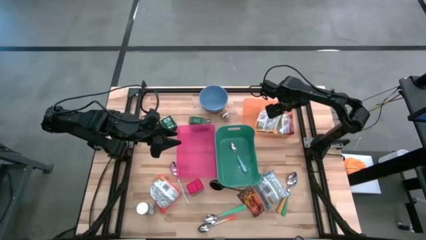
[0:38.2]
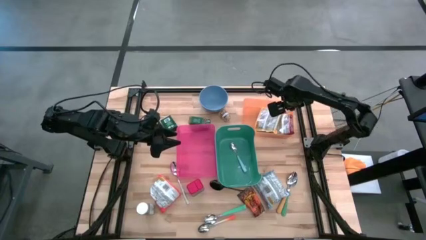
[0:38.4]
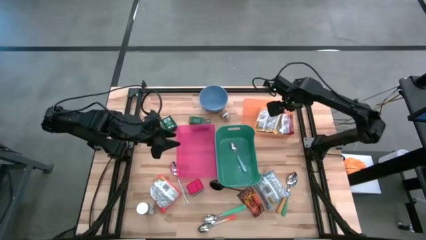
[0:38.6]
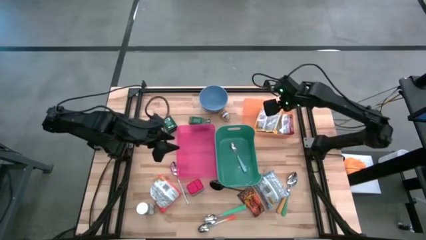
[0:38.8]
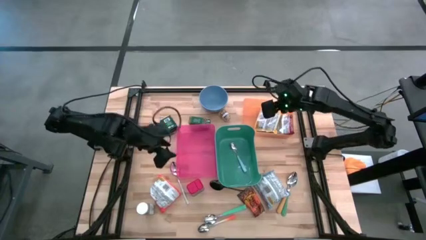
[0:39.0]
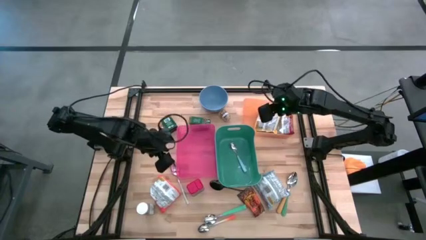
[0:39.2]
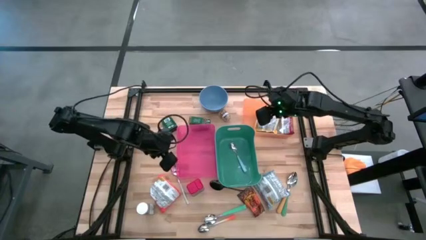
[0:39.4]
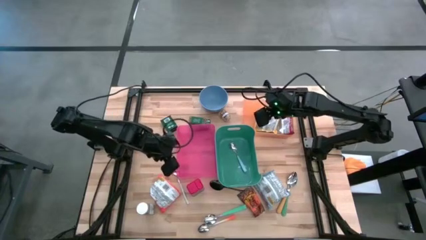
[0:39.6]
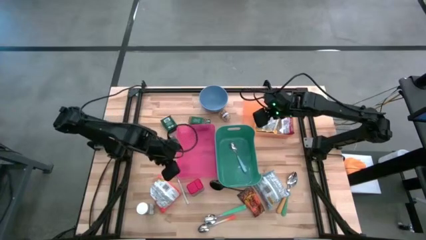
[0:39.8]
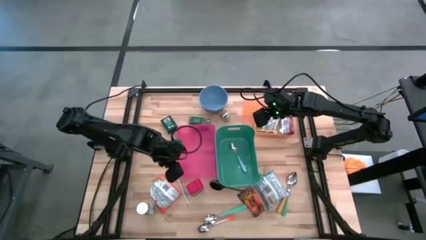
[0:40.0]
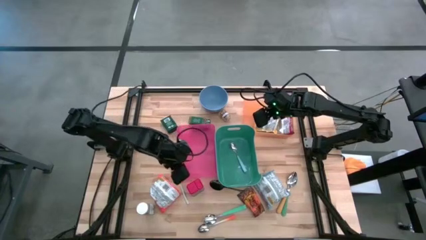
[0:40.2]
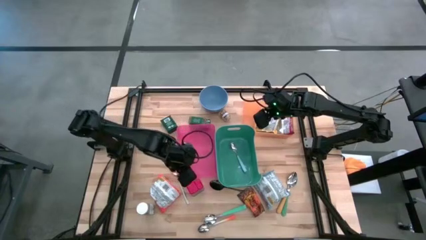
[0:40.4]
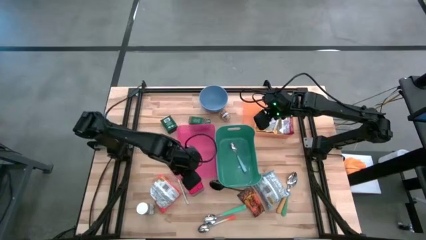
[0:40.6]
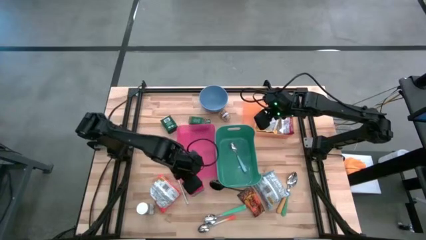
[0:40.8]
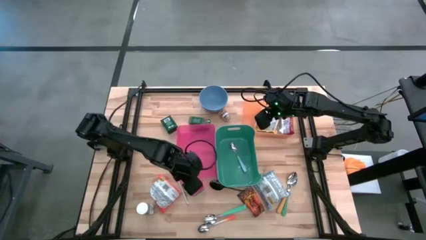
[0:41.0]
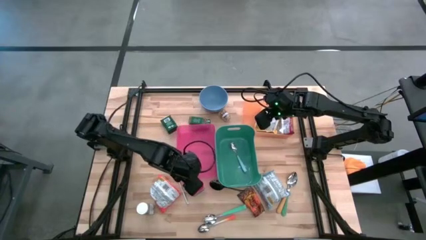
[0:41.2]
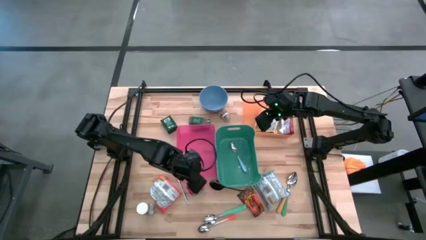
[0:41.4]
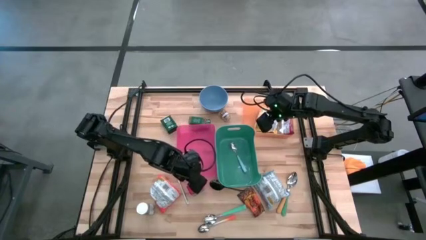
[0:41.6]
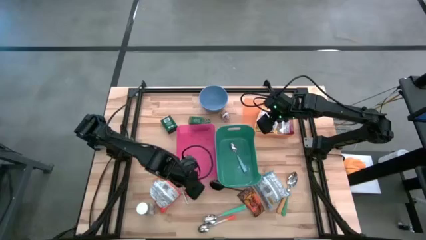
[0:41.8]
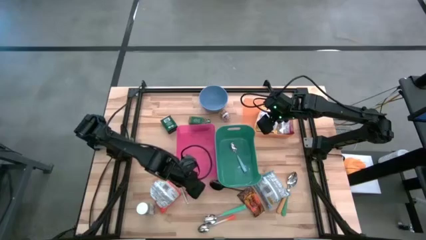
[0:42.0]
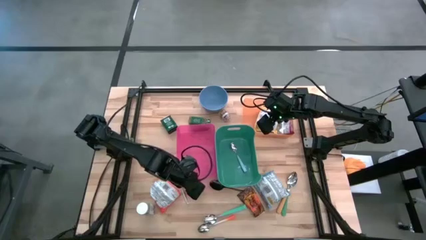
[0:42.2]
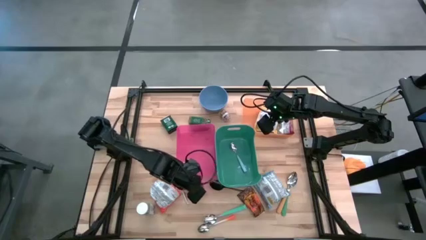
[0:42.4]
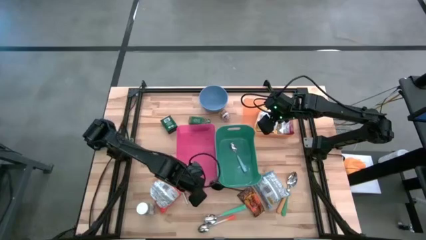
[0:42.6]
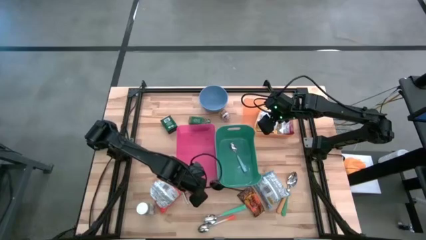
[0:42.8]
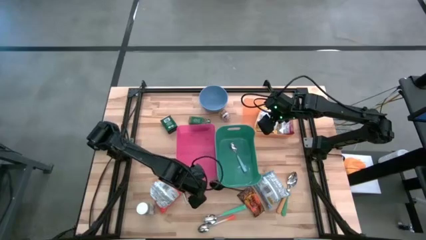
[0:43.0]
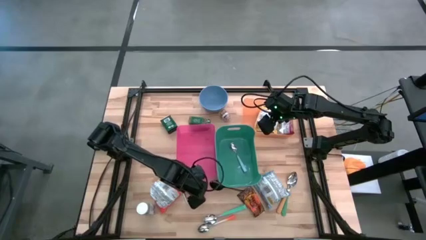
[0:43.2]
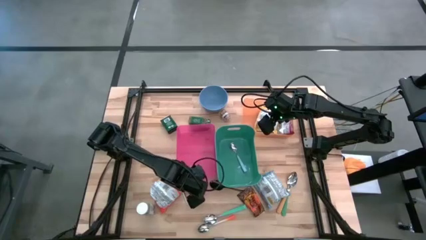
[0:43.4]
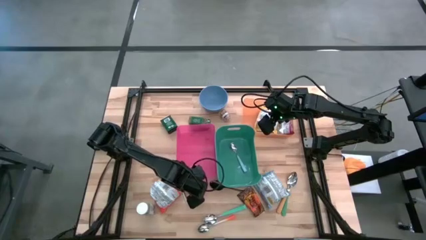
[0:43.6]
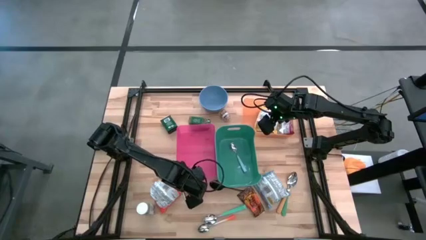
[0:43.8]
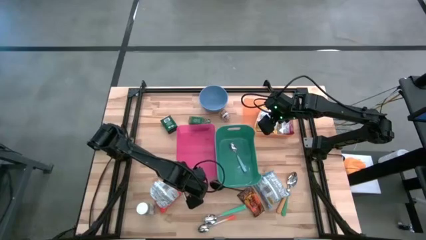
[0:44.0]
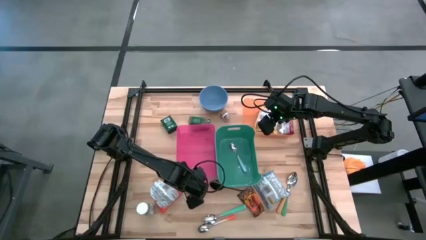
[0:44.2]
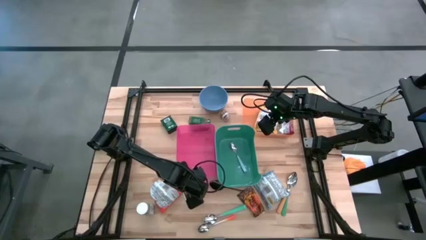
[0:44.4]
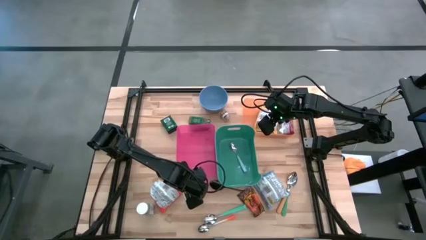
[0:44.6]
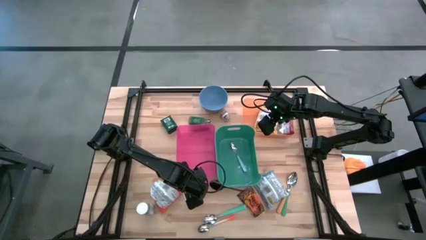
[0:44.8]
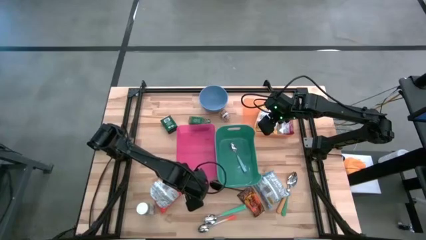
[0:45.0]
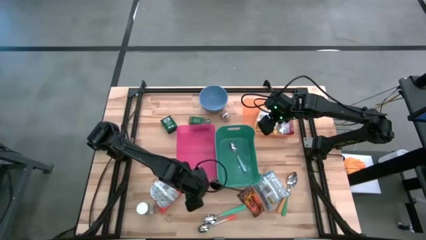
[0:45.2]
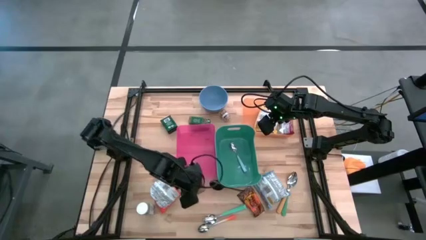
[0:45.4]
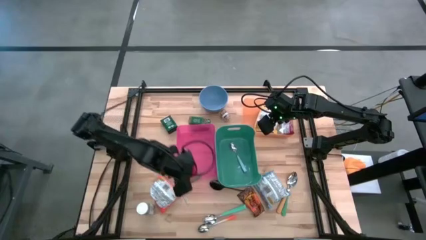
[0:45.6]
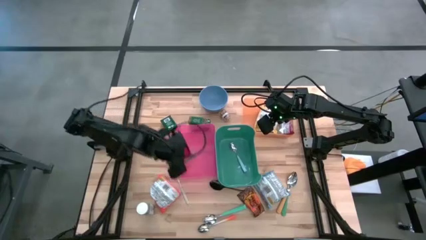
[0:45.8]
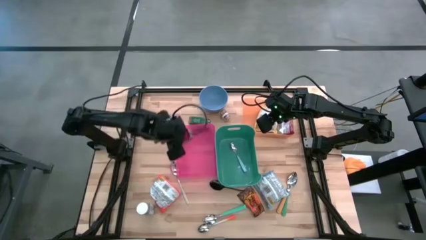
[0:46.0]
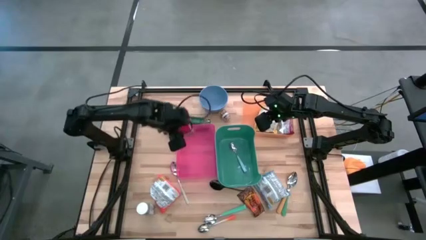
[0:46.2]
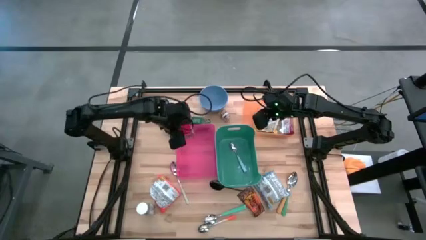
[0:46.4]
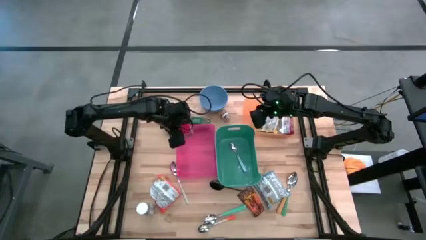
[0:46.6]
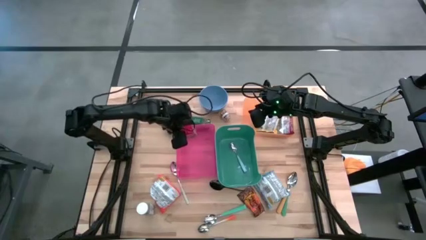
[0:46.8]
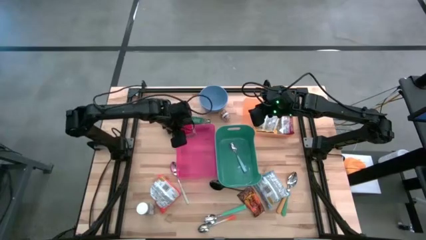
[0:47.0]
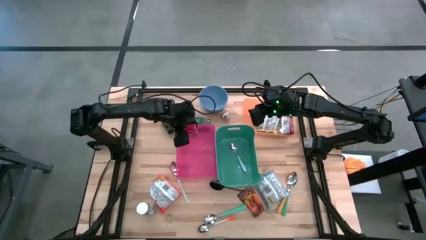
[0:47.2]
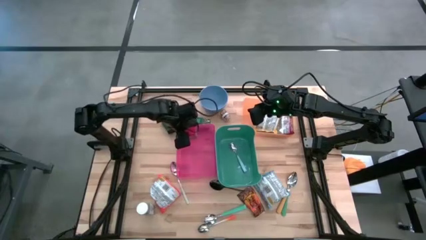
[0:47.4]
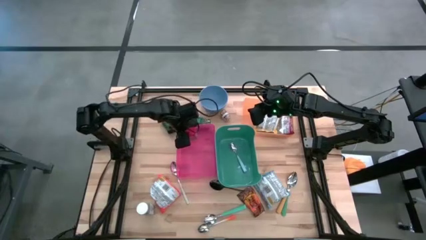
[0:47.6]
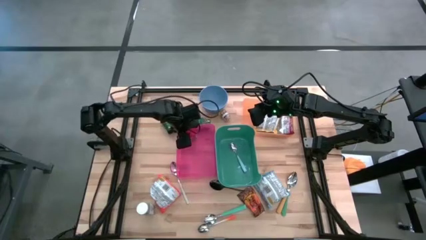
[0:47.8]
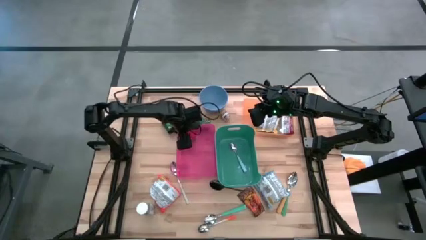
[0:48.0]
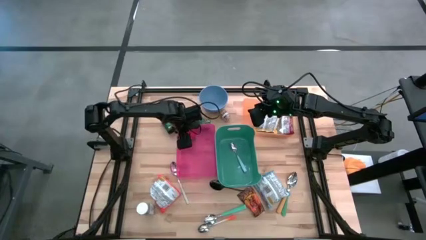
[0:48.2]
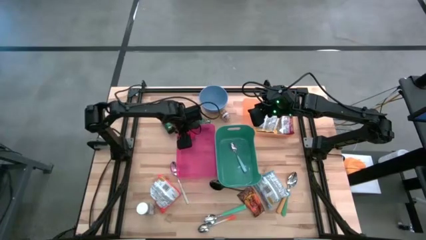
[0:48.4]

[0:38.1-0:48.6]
Put the red spice can into the red bin

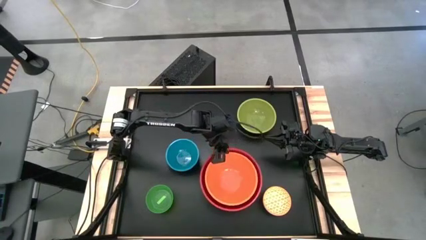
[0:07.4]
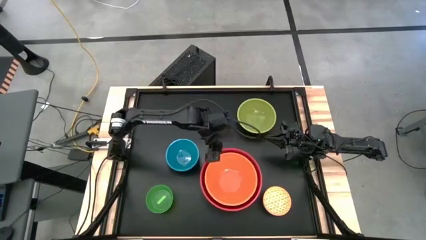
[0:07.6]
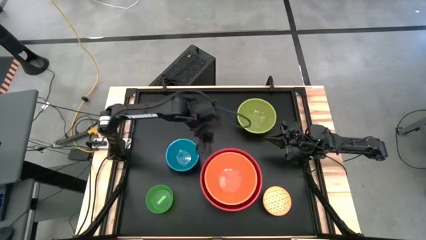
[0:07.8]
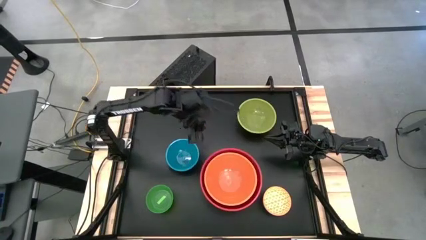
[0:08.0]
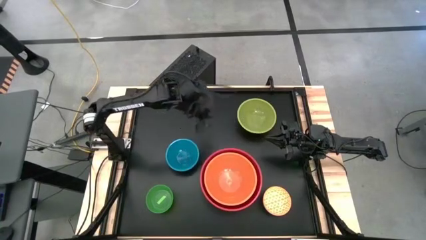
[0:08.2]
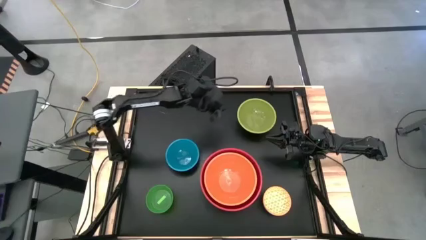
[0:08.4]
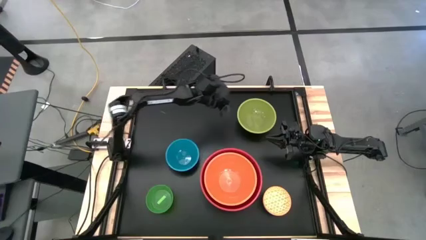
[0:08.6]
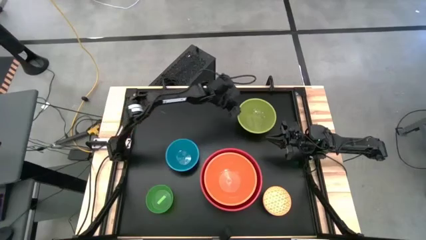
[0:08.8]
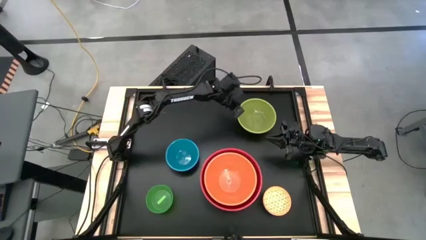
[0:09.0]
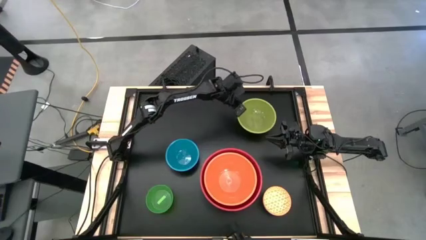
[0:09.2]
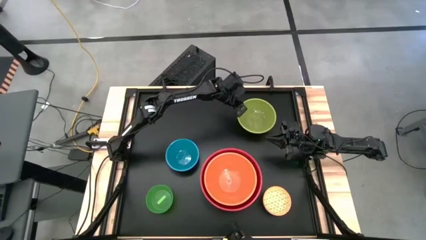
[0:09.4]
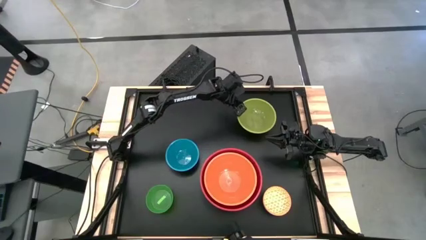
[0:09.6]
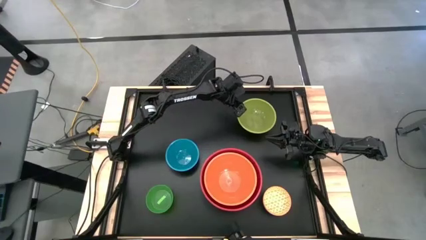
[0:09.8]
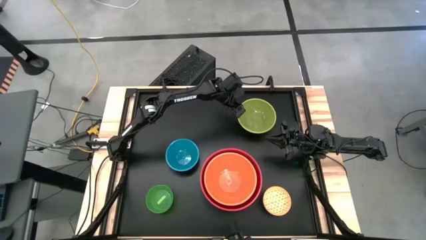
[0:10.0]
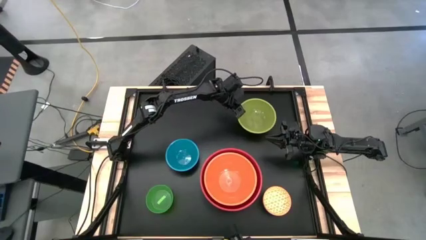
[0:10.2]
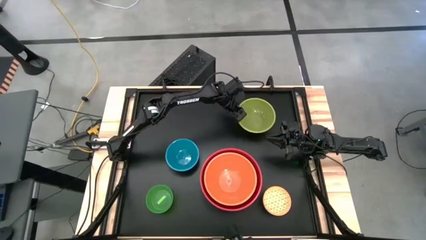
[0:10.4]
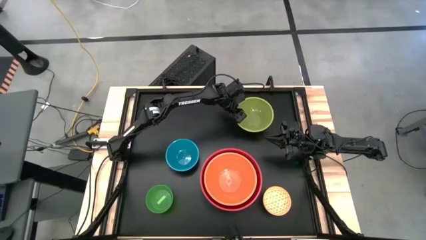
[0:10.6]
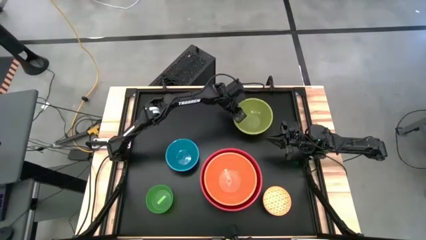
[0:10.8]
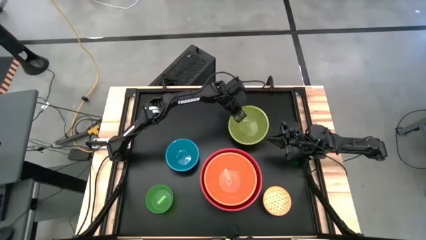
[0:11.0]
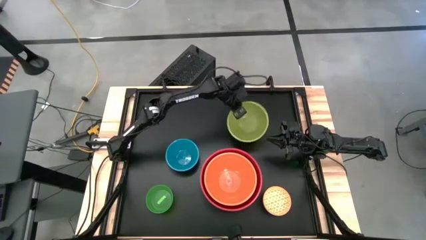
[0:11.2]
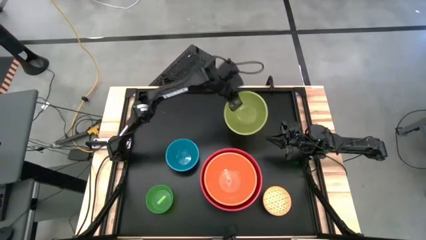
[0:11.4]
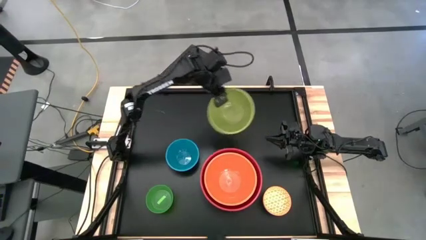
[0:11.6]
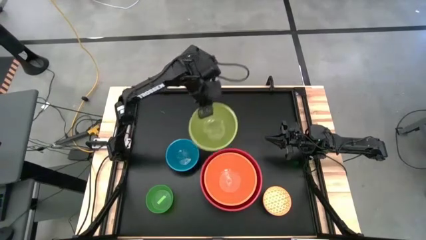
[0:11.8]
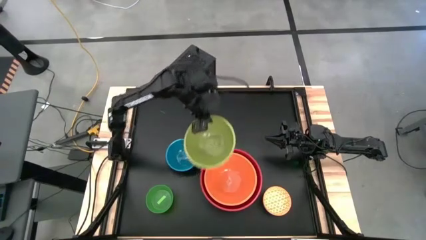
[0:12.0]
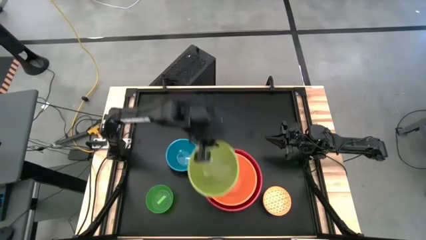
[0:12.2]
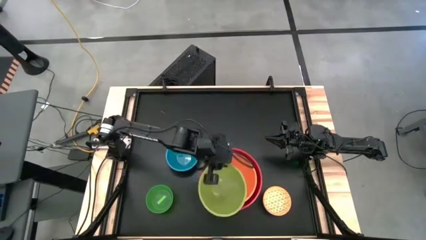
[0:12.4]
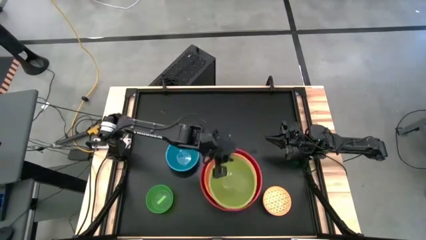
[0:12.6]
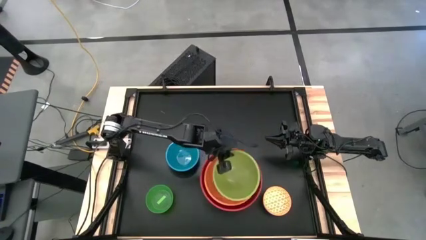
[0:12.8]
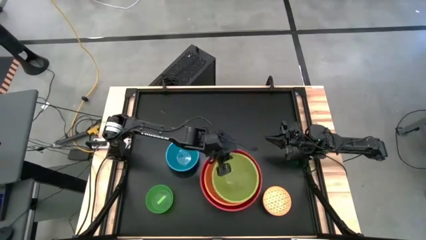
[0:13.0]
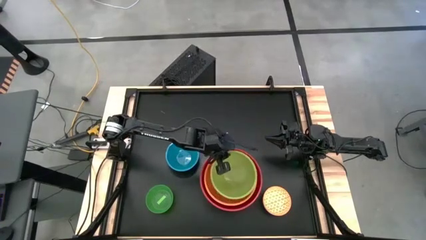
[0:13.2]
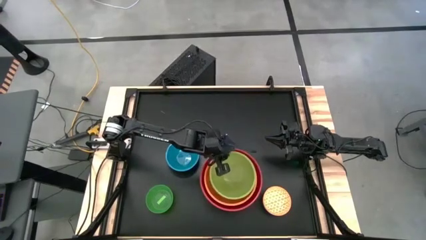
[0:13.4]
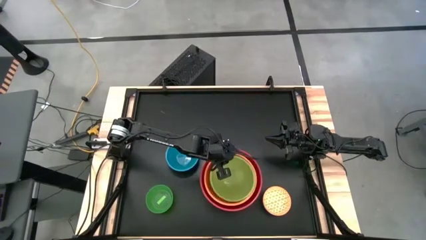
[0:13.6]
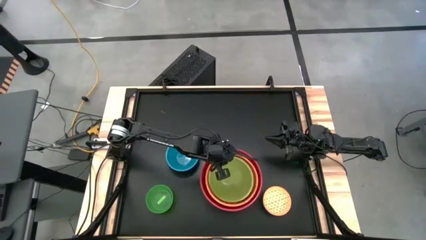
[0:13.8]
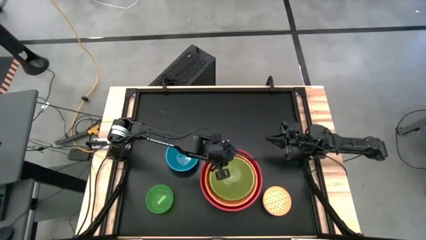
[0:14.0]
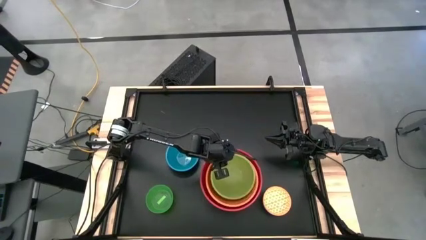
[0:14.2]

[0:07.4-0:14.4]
Stack the green bowl on top of the orange bowl
